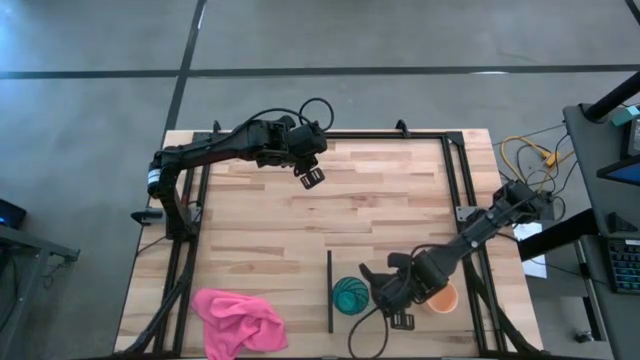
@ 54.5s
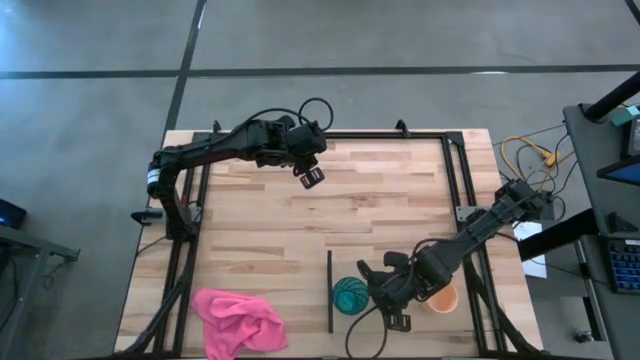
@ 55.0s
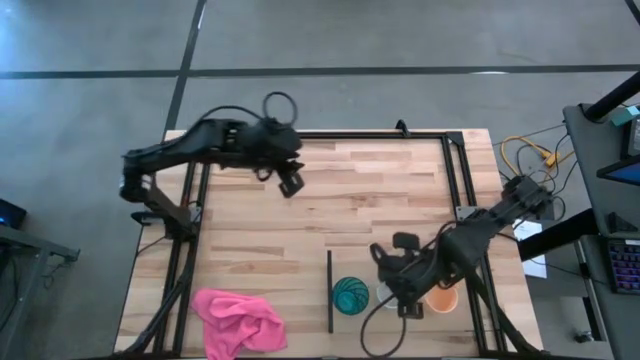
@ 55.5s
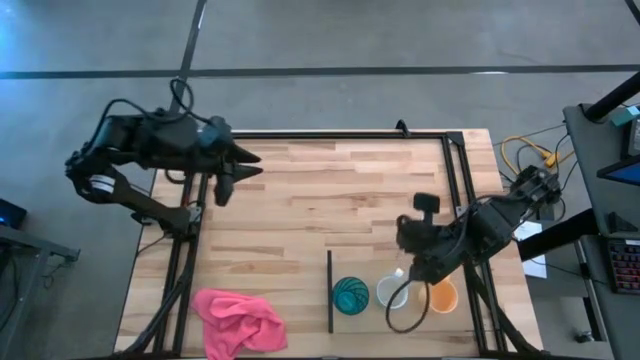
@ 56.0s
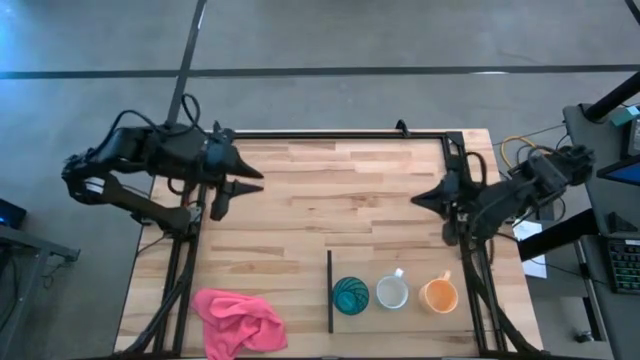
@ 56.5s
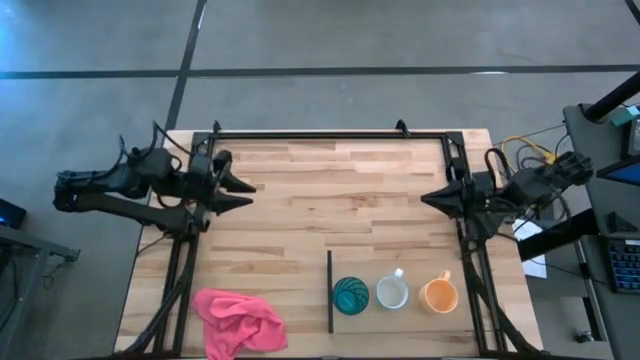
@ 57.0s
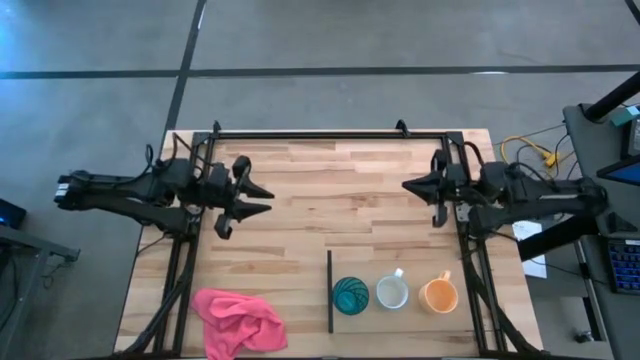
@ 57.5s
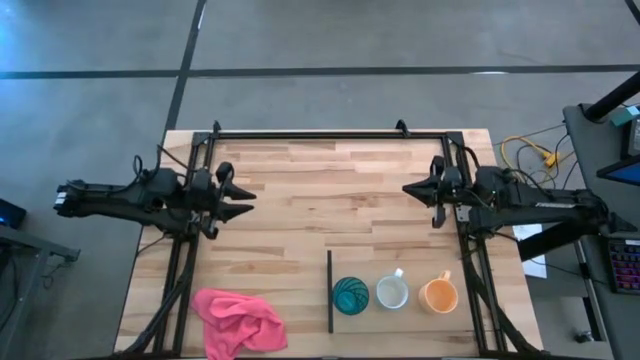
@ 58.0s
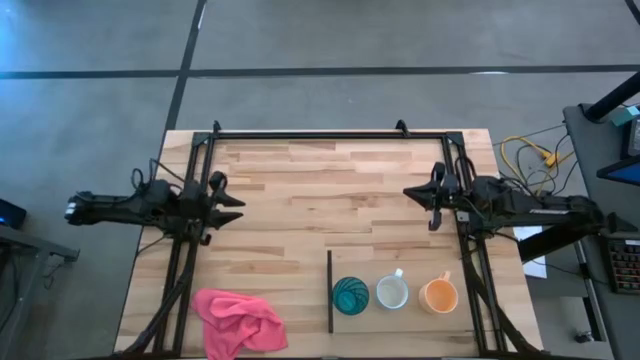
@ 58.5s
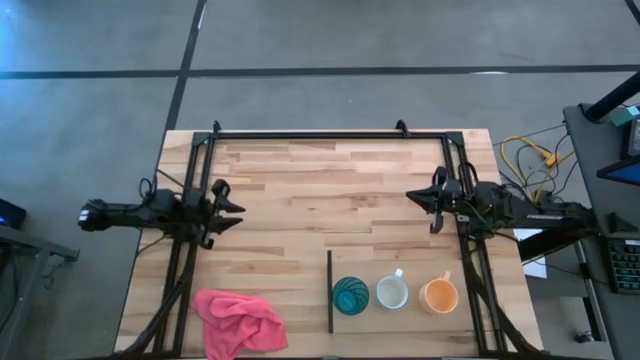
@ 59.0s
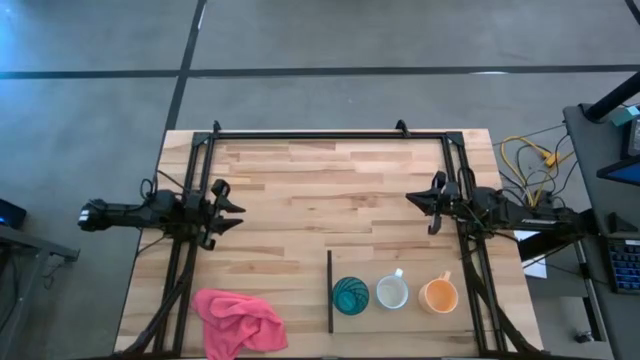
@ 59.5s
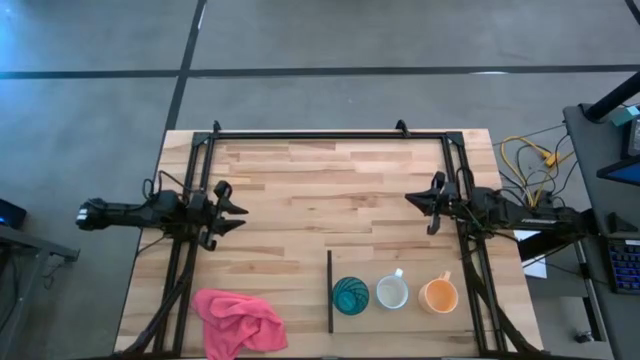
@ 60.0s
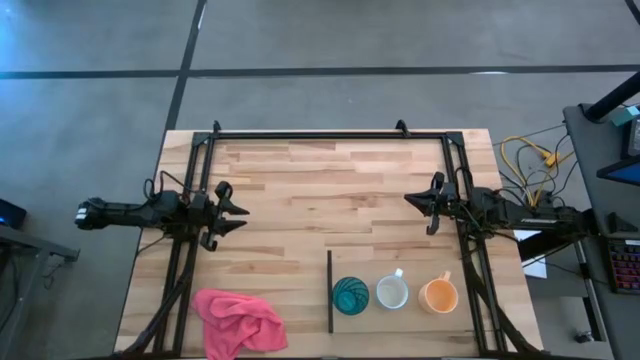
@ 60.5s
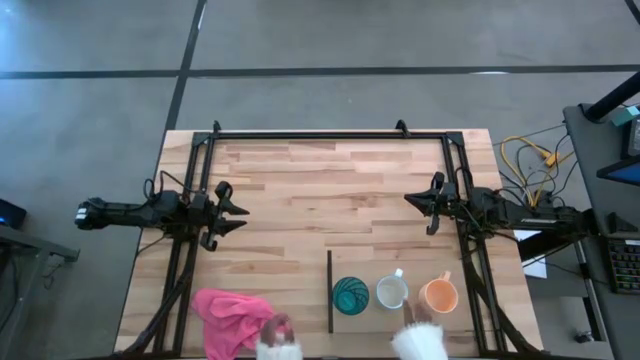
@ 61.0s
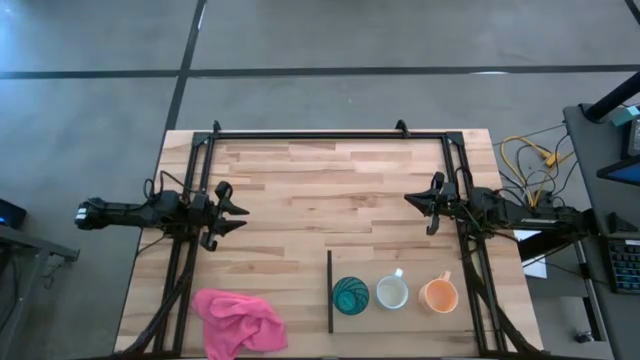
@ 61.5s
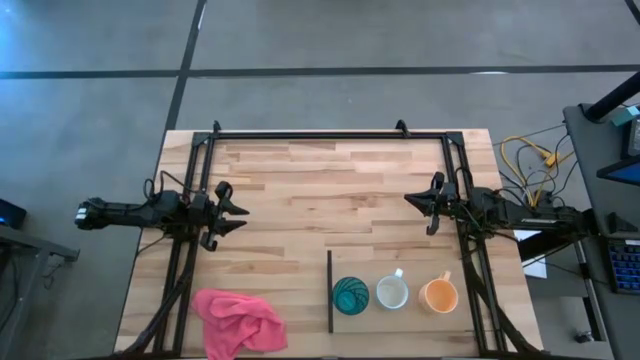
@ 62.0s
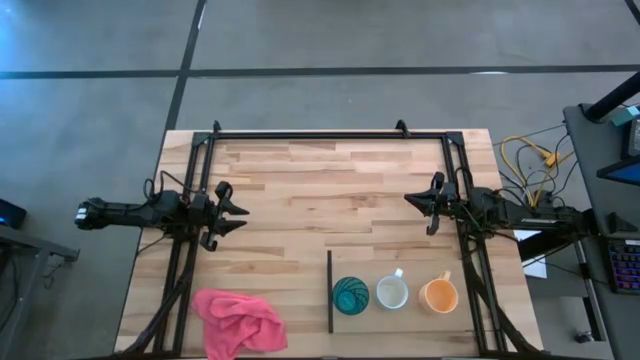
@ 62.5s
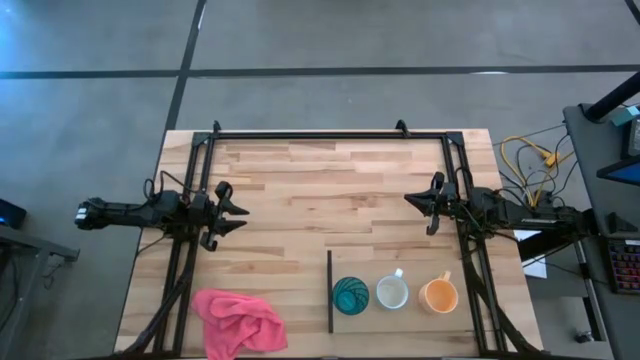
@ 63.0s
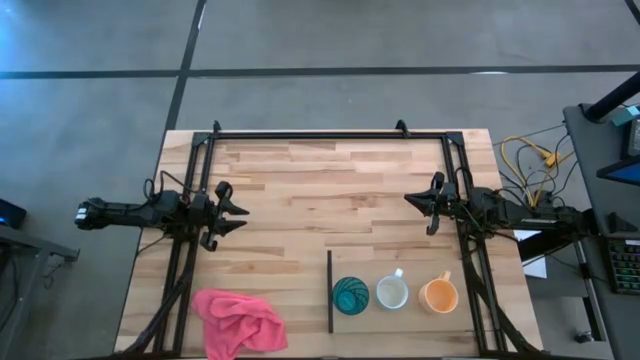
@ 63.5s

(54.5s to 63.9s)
Task: Stack small to large cups/mugs on shelf
Return to Home Position

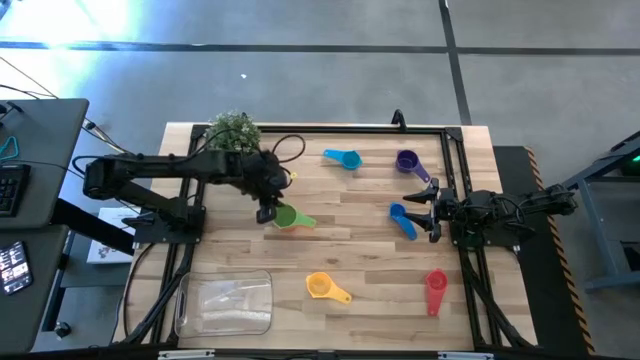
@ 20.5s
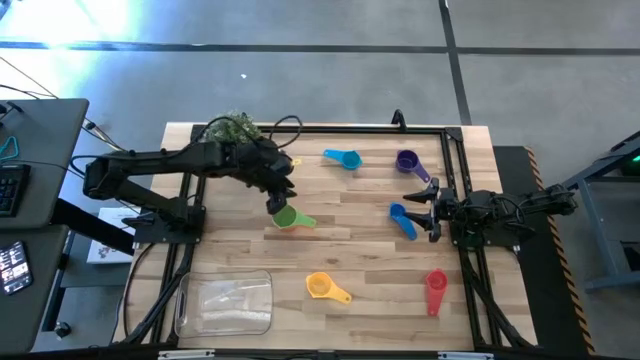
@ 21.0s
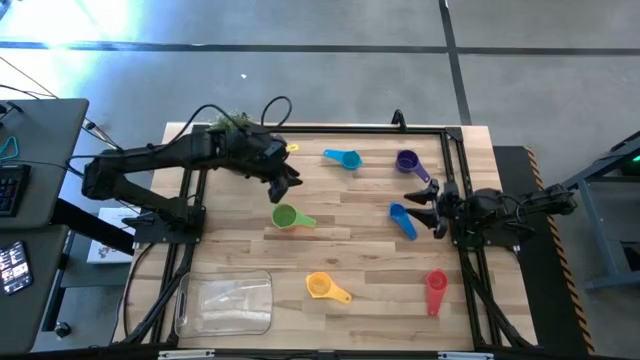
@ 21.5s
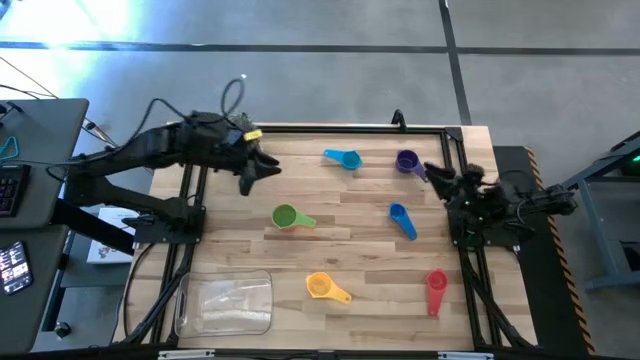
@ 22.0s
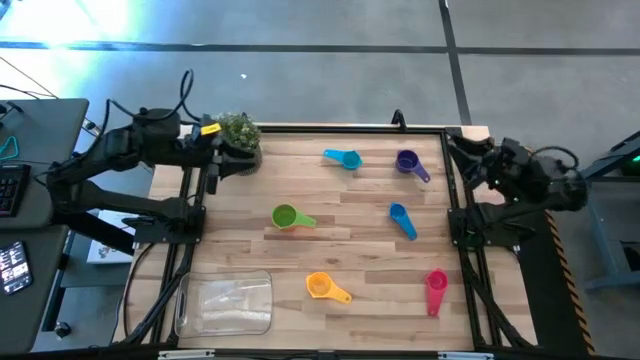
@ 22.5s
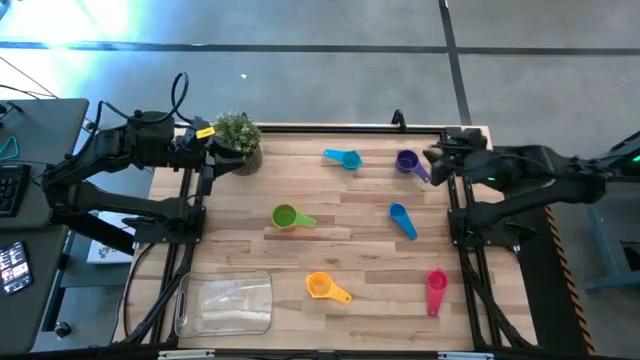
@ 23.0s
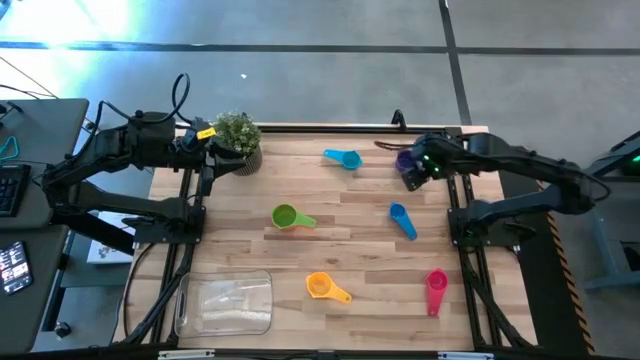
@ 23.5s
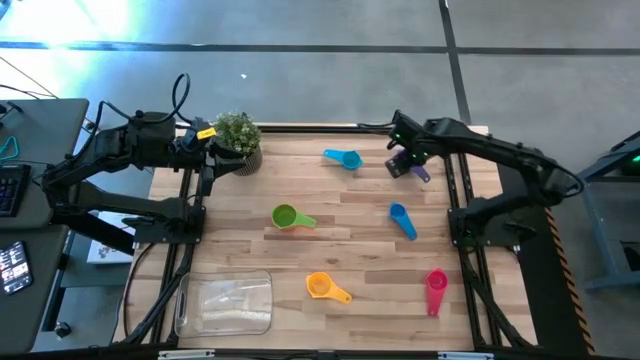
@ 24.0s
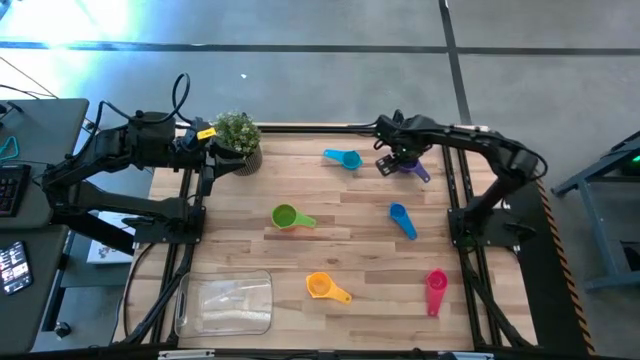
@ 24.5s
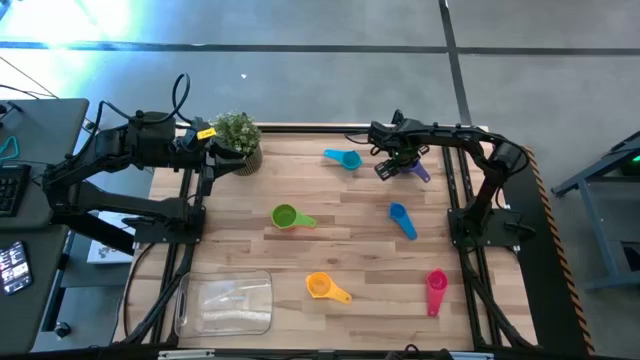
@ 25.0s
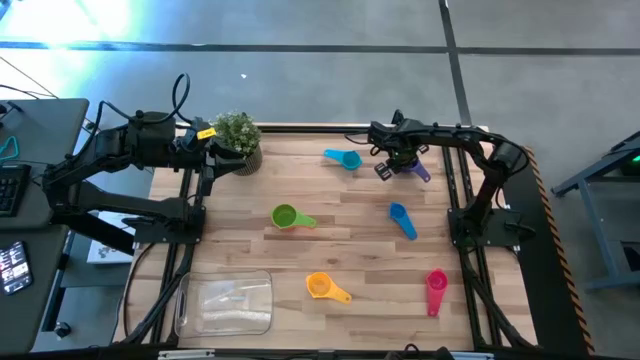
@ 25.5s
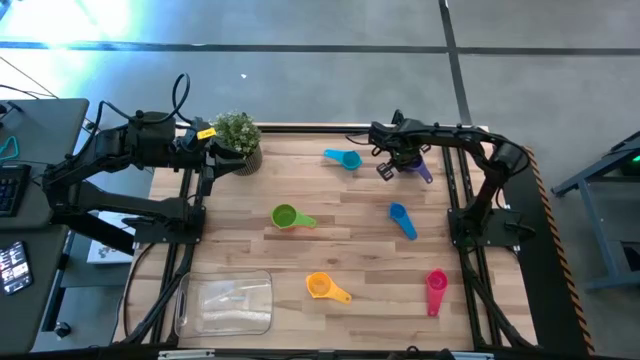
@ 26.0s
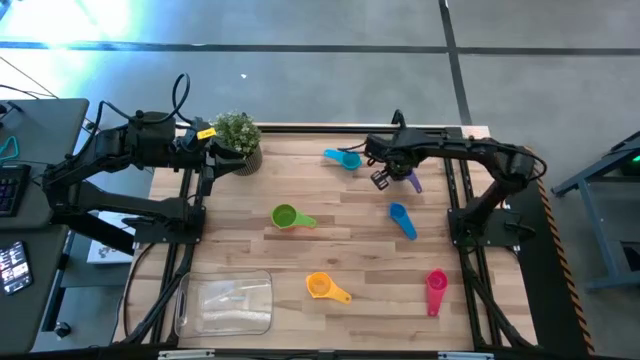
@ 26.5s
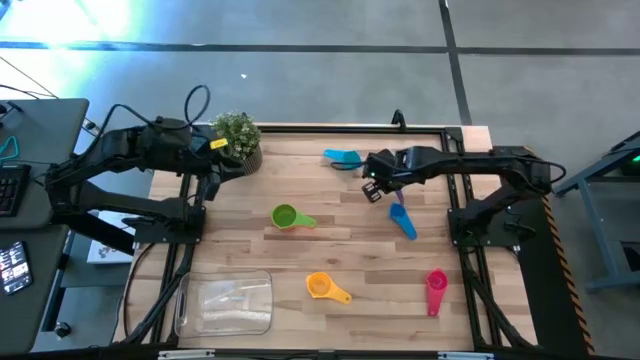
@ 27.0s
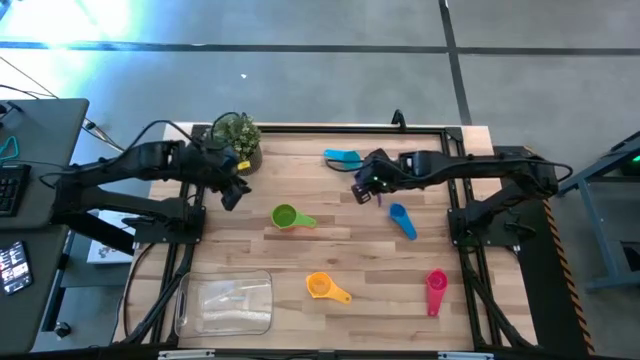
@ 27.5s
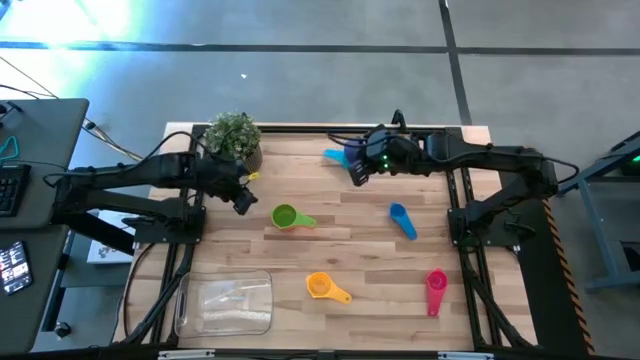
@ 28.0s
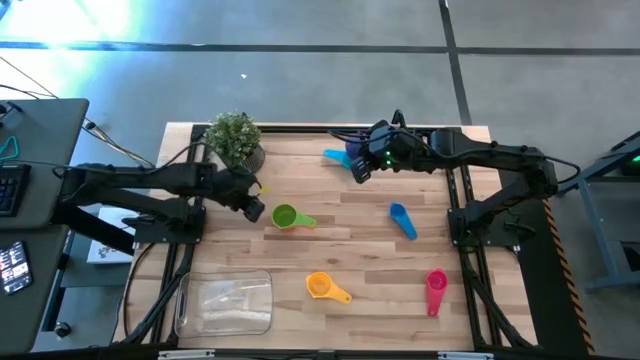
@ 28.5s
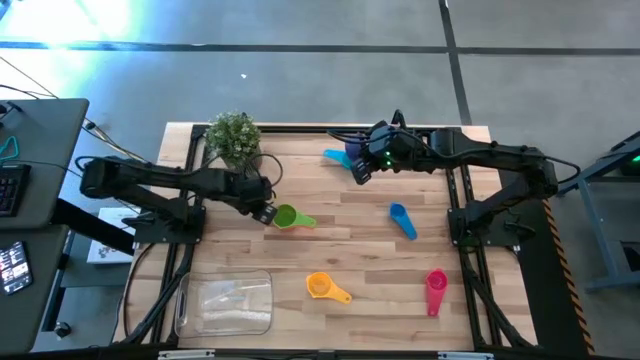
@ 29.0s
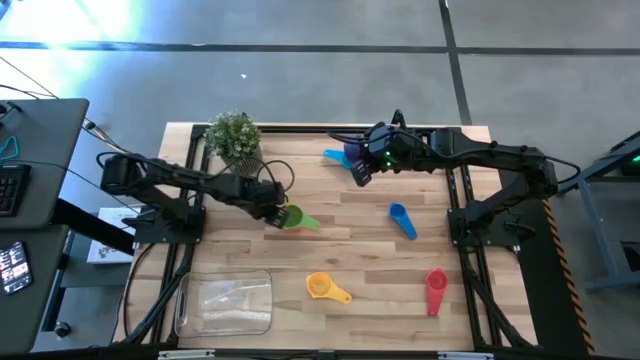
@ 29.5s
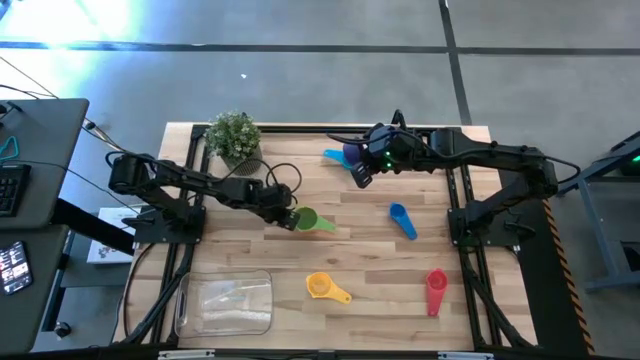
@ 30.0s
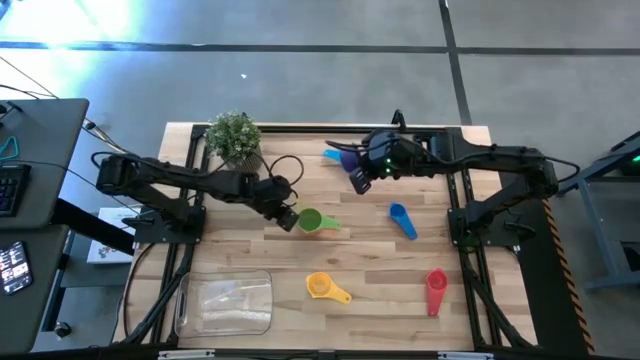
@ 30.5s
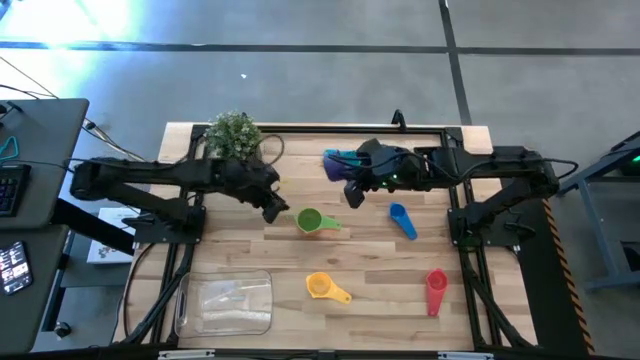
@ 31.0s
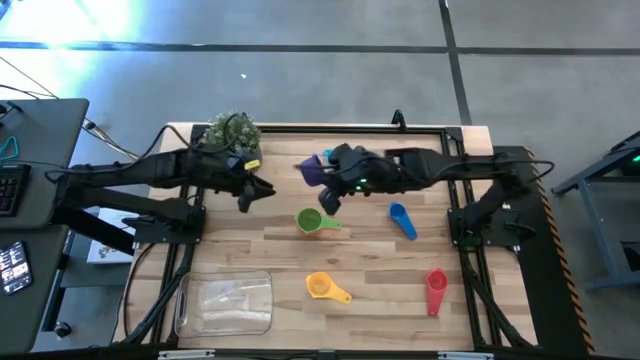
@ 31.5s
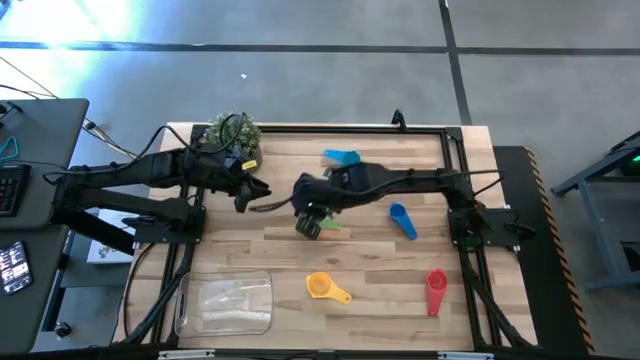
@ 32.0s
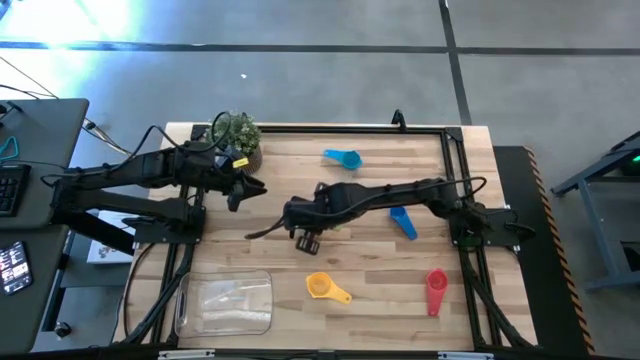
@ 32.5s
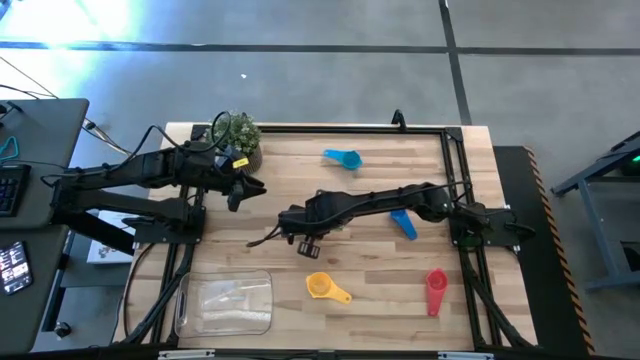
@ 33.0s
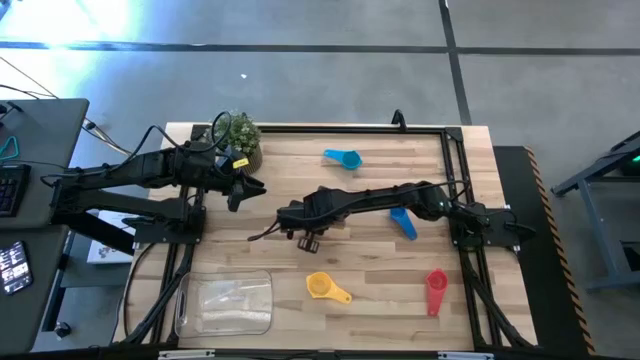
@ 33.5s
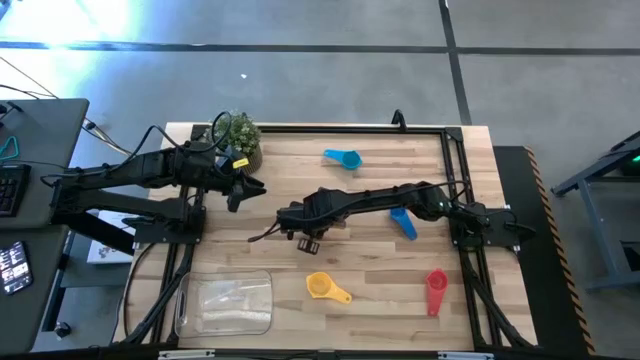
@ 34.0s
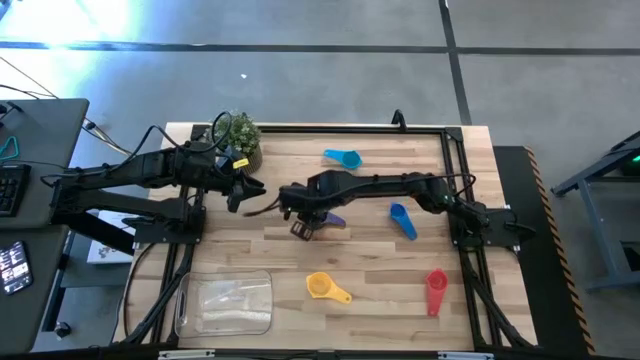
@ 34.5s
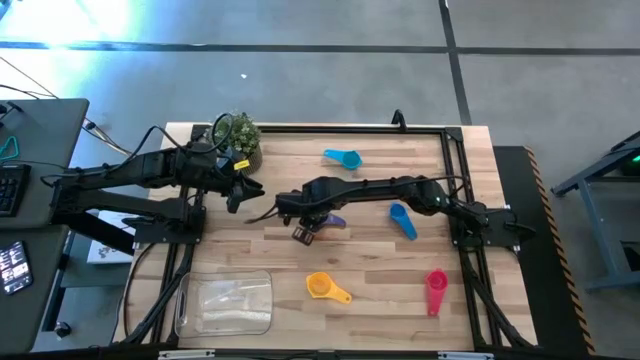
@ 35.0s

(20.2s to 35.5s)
Task: Nest measuring cups in basket
Stack the dark blue measuring cup on the green measuring cup
